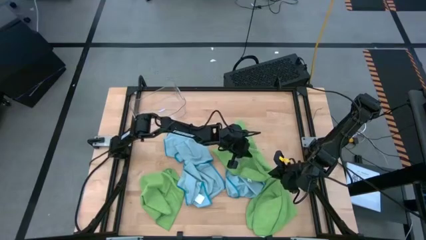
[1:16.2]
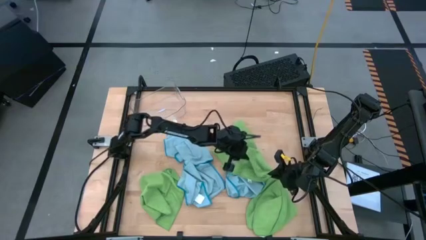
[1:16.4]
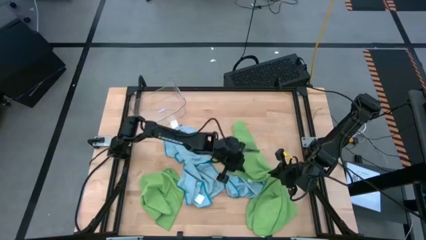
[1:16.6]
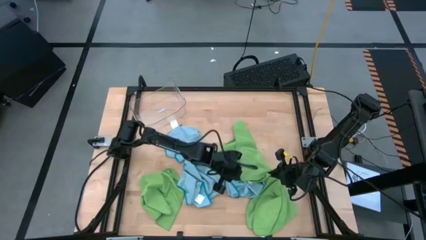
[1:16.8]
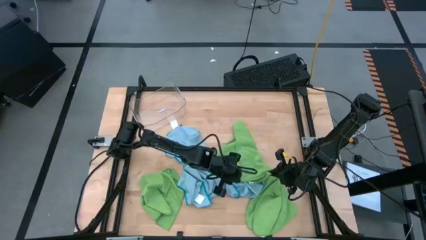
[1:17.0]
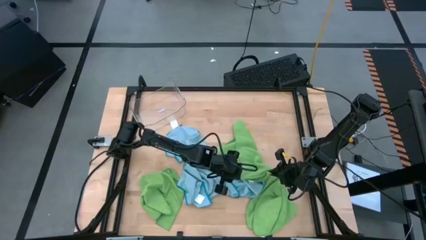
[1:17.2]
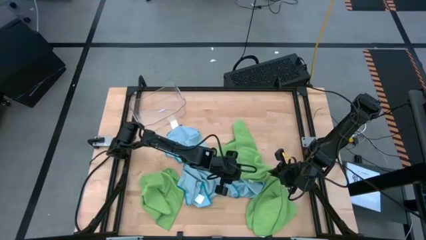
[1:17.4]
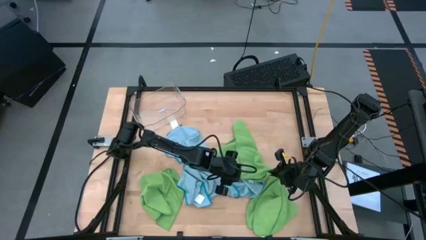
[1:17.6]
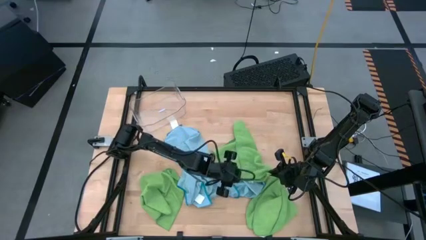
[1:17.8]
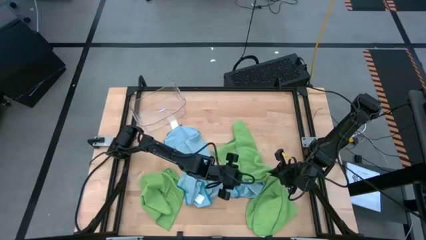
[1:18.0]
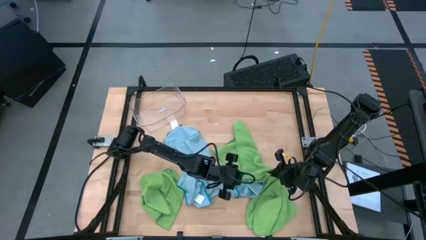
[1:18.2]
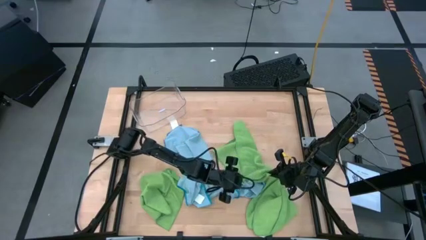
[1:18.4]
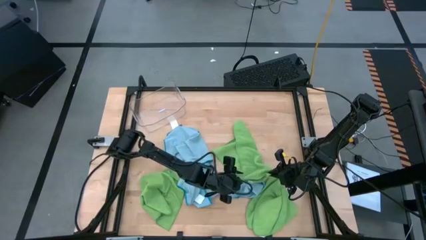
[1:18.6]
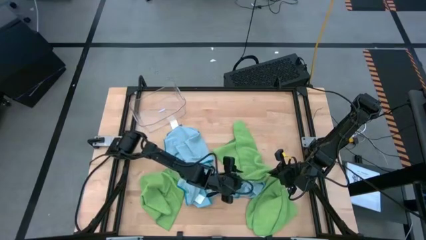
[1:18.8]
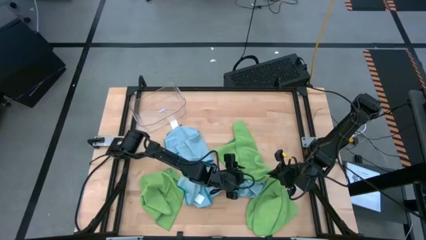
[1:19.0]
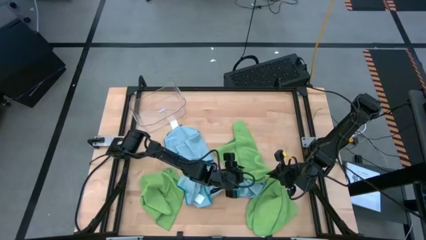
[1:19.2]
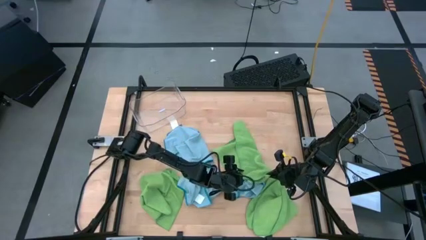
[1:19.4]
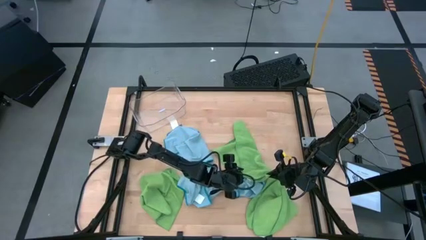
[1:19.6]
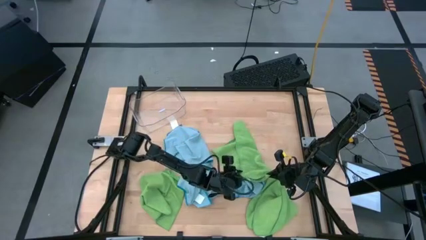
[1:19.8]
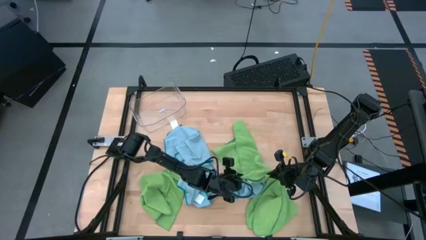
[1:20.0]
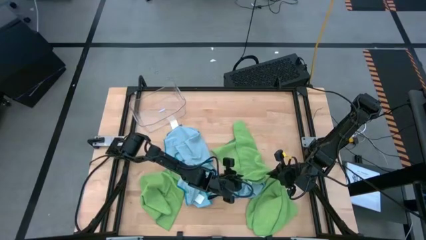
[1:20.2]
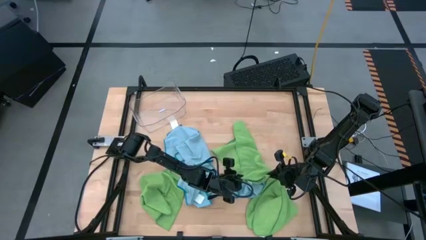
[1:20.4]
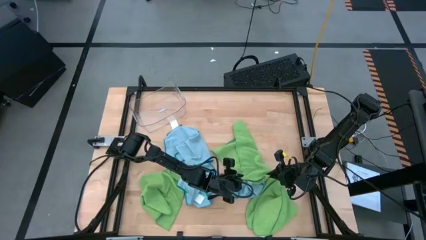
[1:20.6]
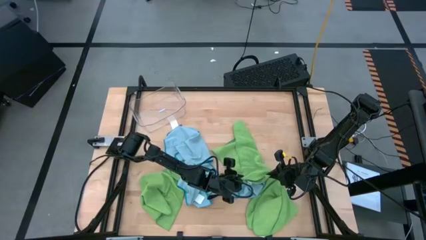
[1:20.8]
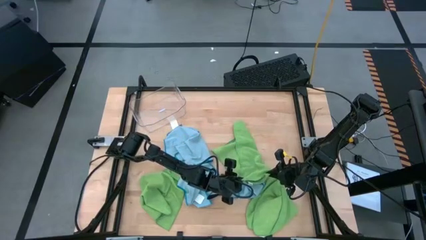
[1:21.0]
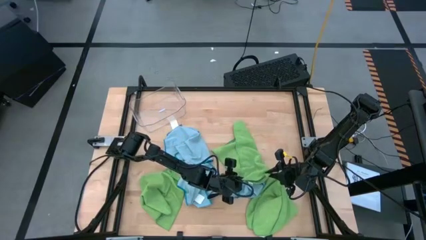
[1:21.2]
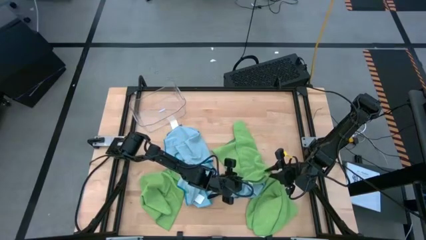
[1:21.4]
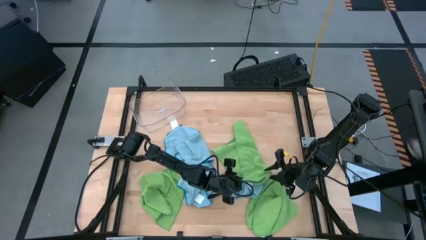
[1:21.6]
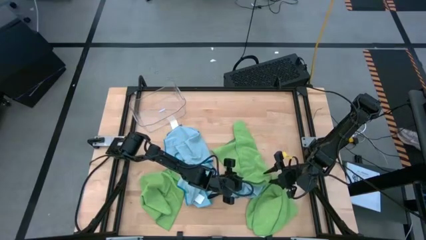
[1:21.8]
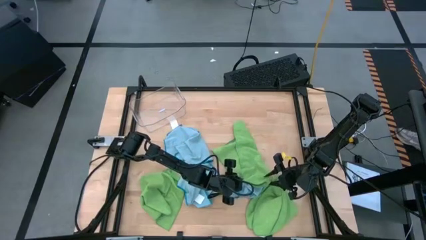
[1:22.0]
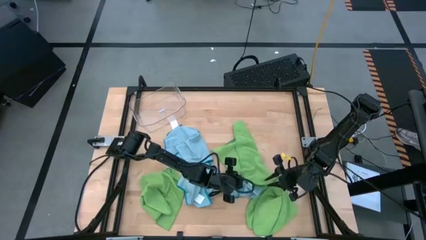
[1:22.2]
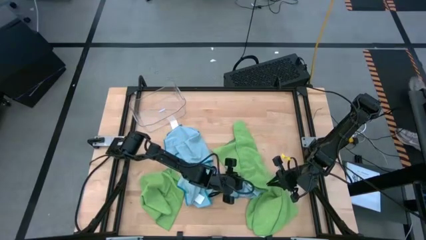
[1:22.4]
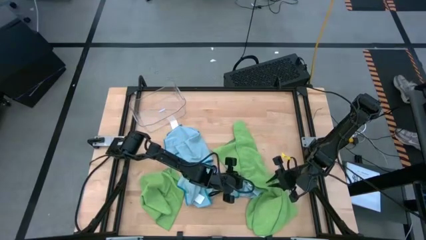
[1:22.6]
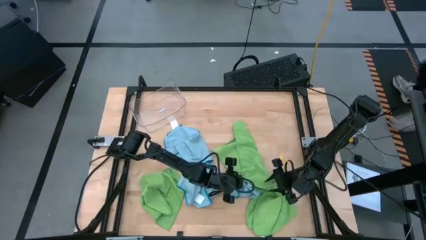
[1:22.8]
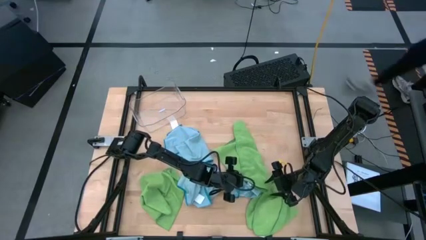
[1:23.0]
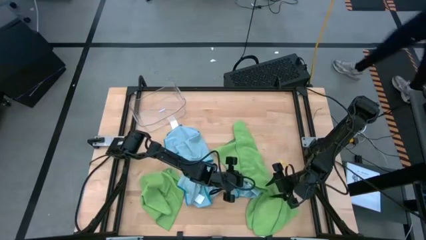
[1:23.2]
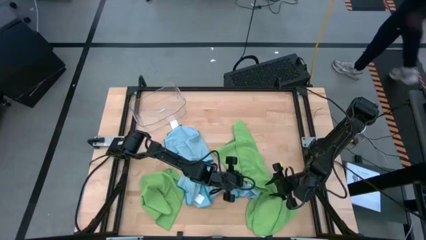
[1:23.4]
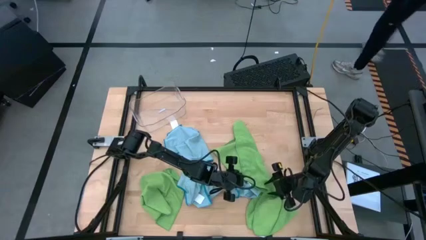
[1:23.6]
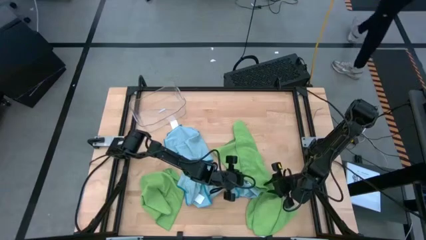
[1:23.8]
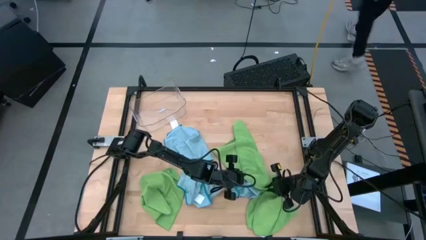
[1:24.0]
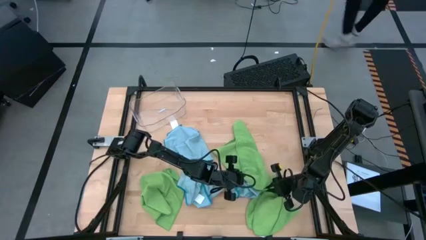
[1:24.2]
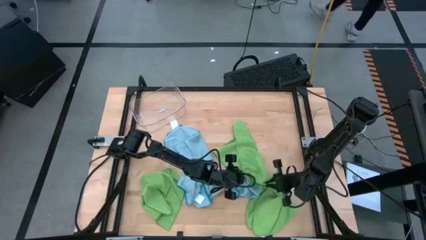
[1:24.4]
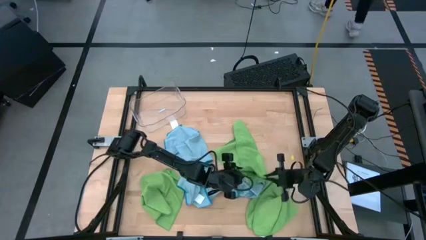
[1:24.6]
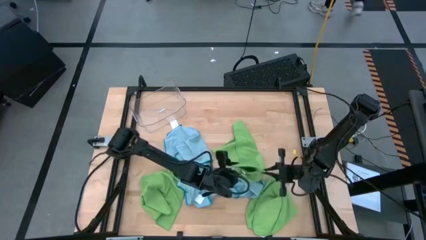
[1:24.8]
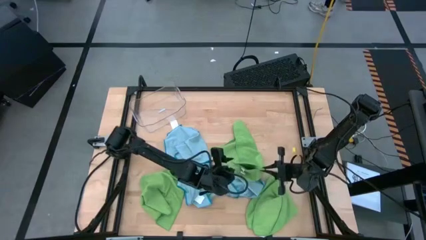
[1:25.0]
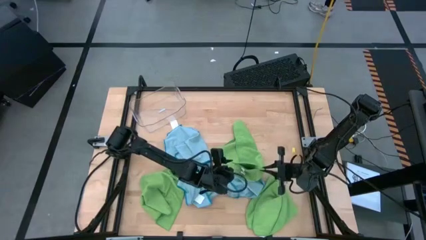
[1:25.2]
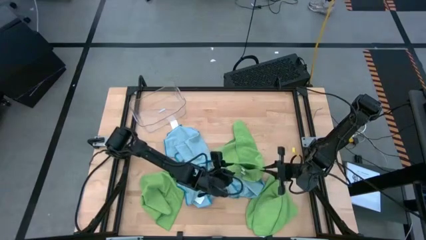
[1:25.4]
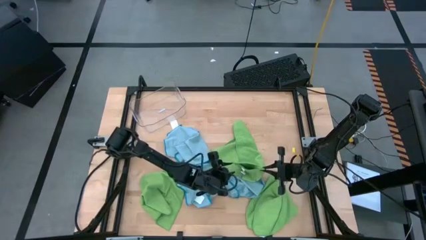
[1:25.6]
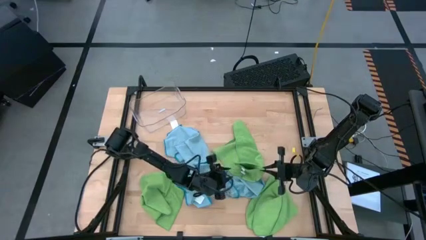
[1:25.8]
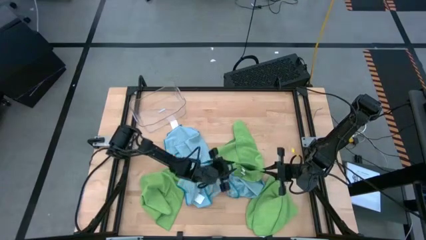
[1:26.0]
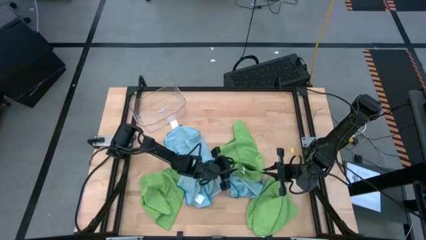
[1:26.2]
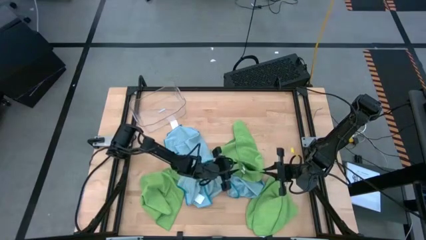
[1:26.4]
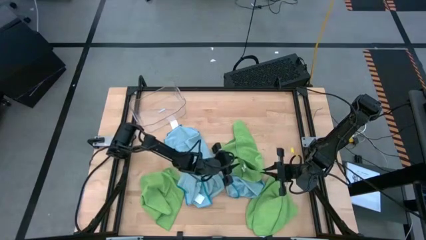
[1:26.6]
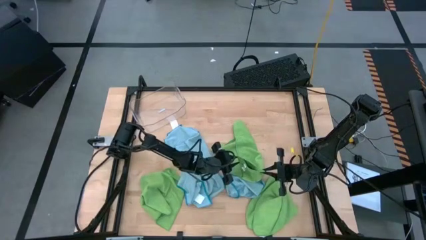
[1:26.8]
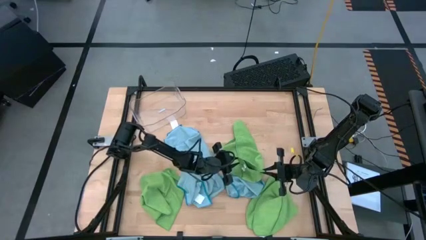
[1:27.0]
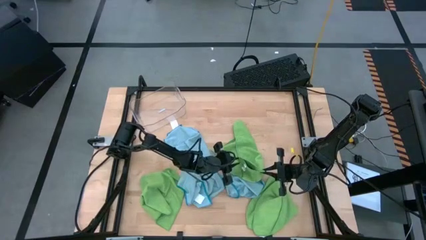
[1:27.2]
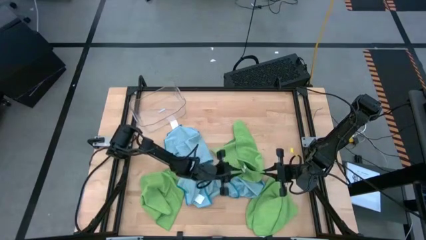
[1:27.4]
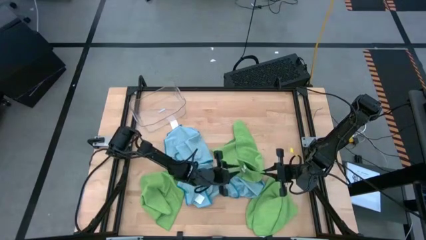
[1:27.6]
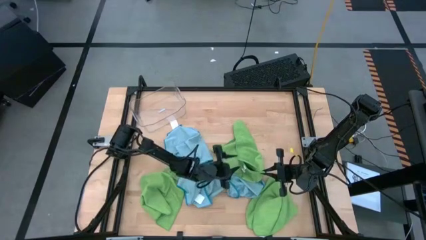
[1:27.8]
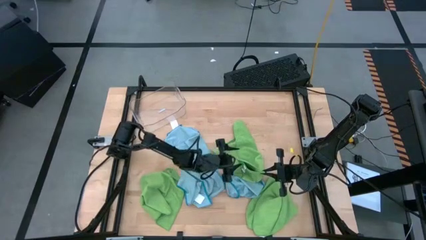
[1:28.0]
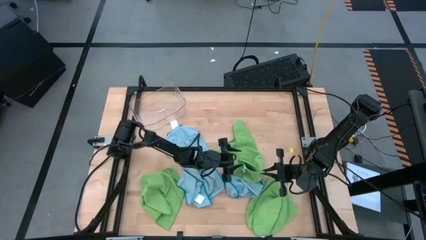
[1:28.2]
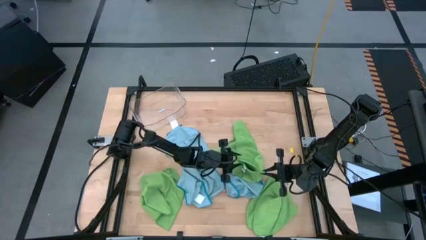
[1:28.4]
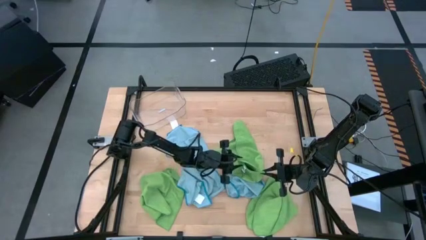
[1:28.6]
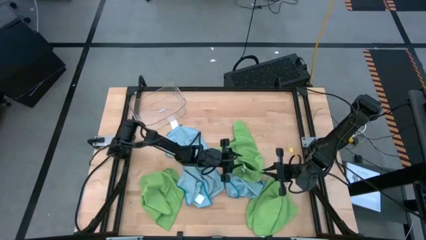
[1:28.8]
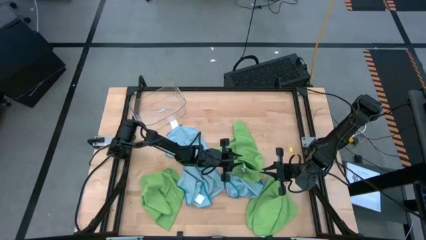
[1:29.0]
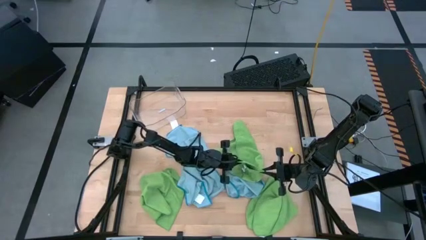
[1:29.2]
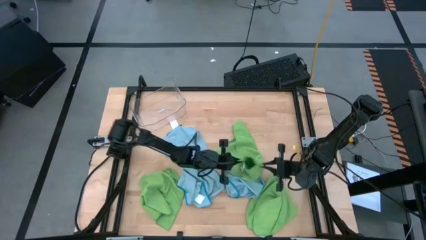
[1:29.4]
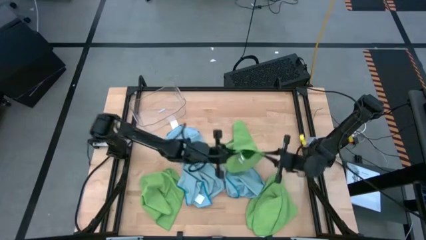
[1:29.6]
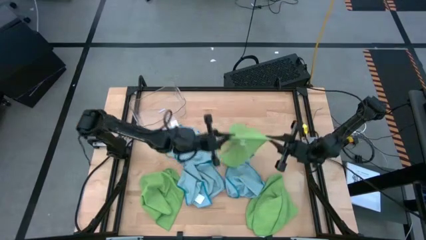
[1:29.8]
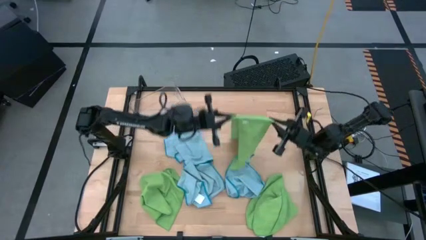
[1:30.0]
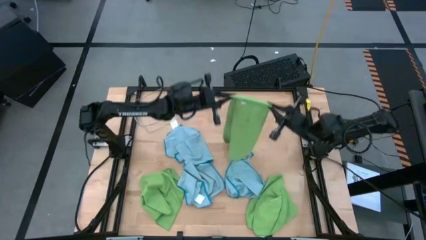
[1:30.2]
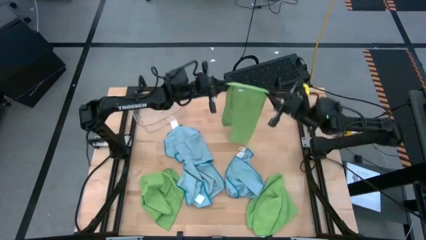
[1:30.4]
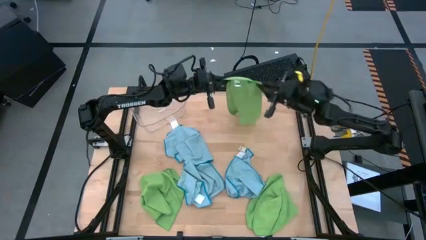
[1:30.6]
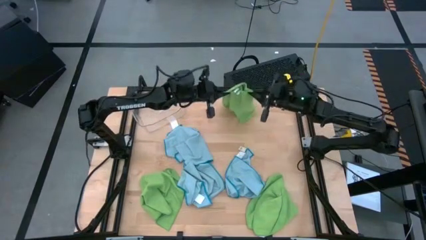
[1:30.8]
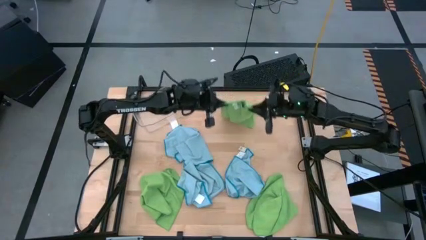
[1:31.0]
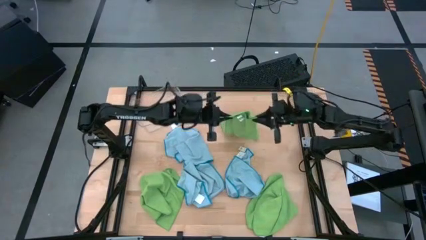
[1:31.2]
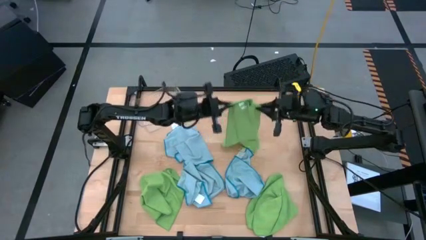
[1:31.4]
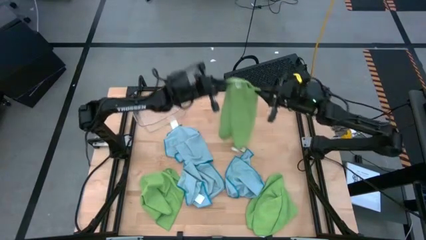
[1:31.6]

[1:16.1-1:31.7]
Task: Fold microfiber towels
Fold the top right green microfiber cloth
